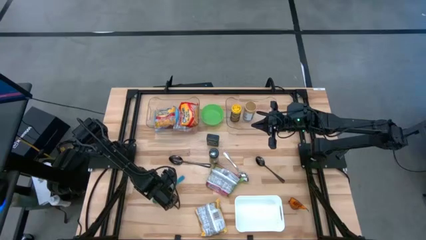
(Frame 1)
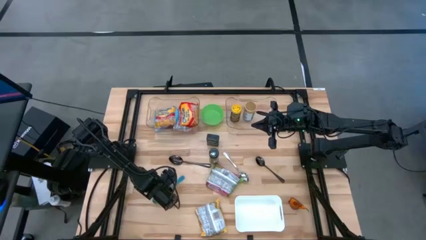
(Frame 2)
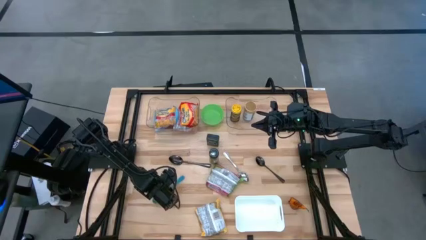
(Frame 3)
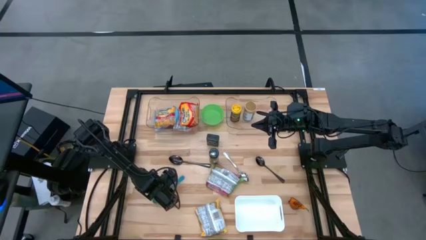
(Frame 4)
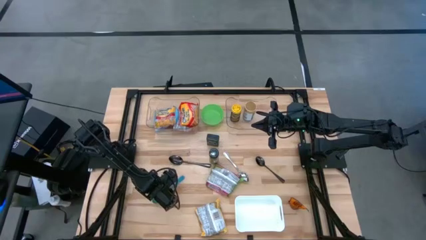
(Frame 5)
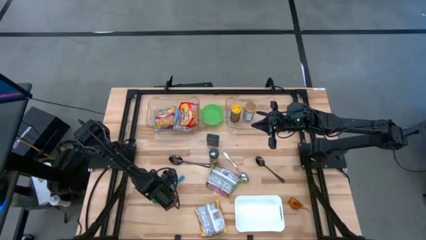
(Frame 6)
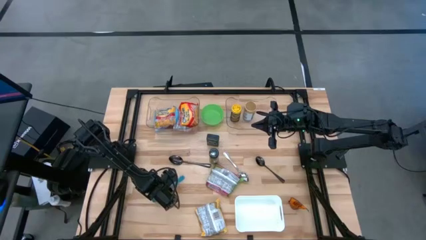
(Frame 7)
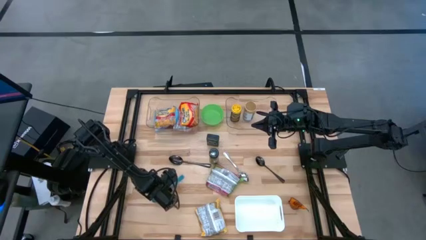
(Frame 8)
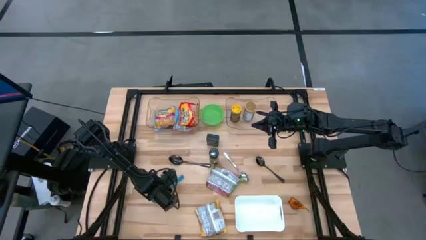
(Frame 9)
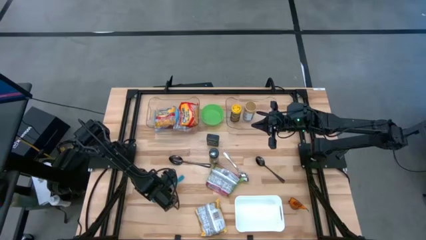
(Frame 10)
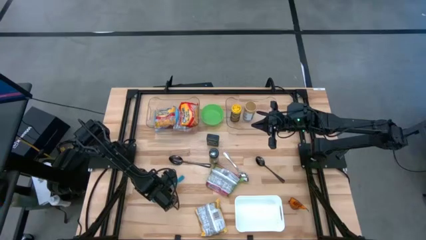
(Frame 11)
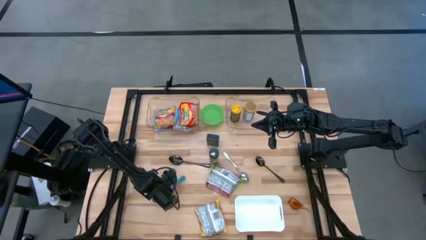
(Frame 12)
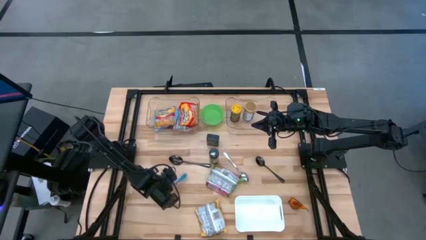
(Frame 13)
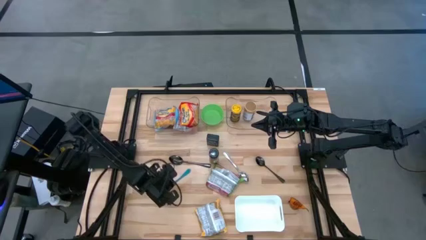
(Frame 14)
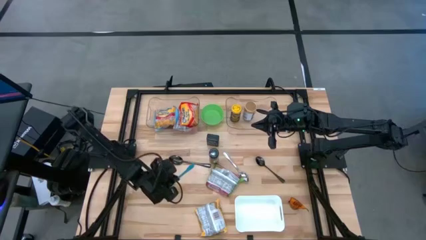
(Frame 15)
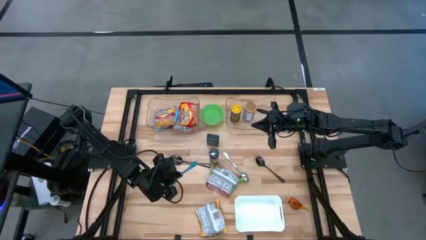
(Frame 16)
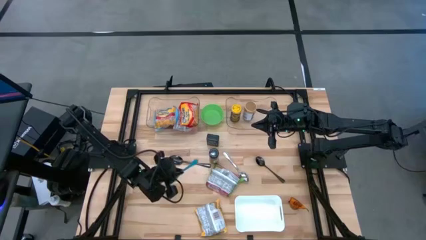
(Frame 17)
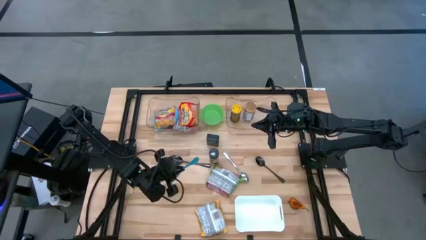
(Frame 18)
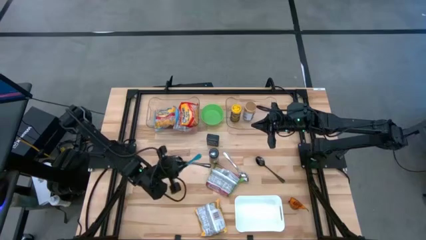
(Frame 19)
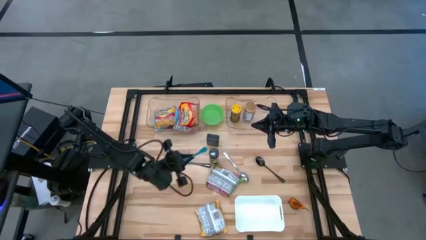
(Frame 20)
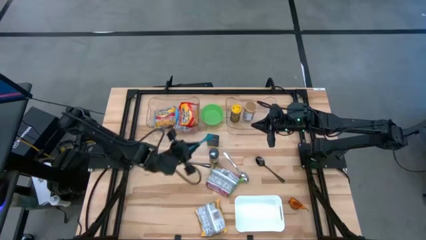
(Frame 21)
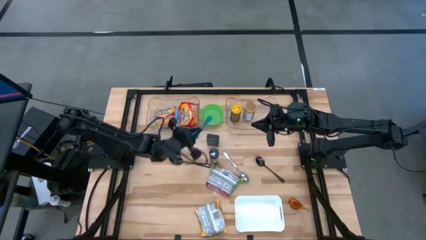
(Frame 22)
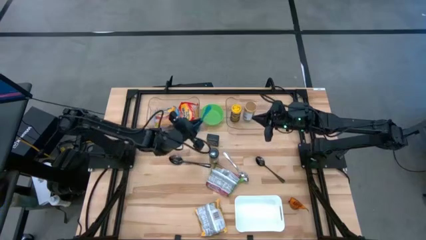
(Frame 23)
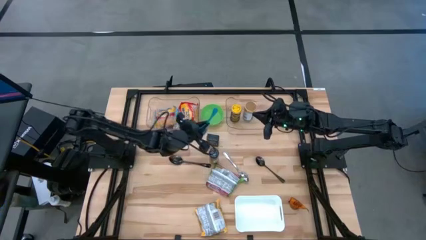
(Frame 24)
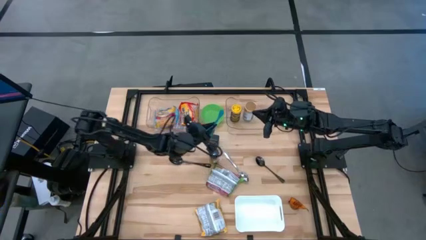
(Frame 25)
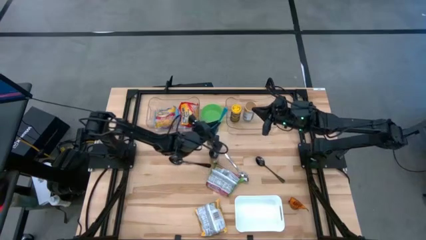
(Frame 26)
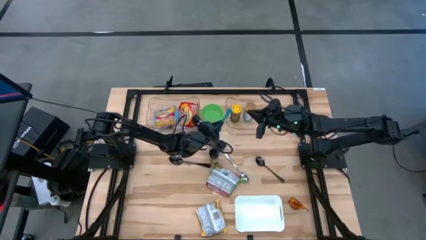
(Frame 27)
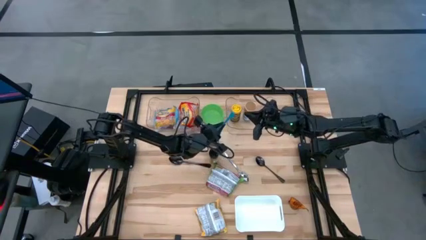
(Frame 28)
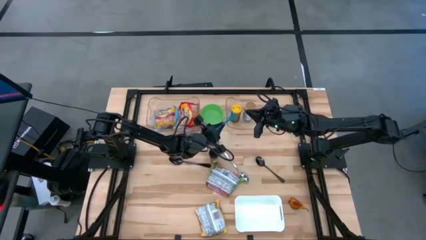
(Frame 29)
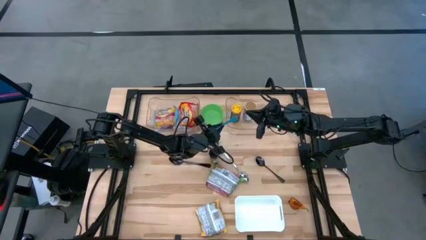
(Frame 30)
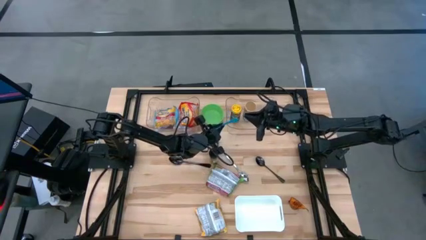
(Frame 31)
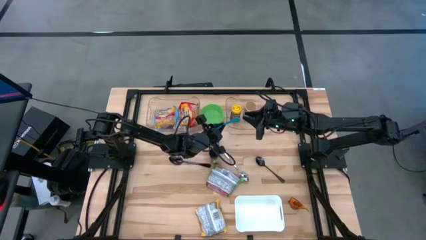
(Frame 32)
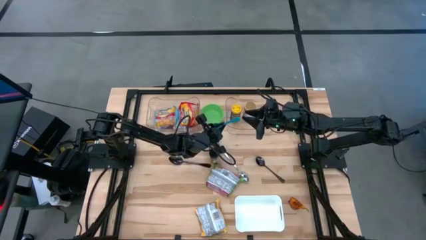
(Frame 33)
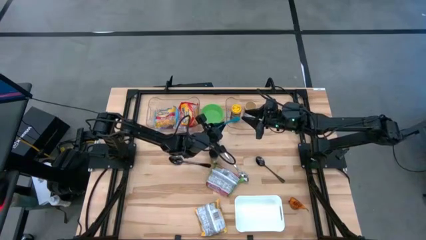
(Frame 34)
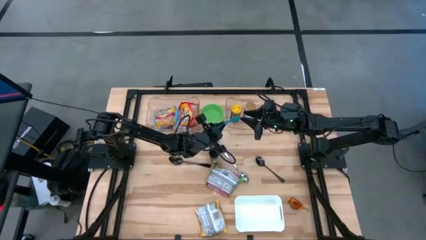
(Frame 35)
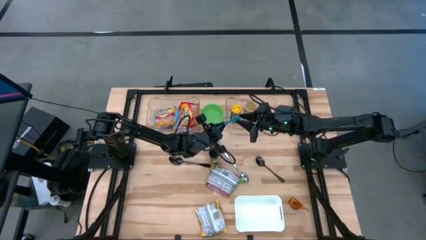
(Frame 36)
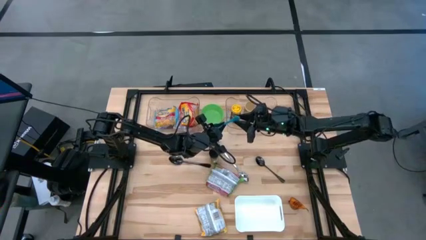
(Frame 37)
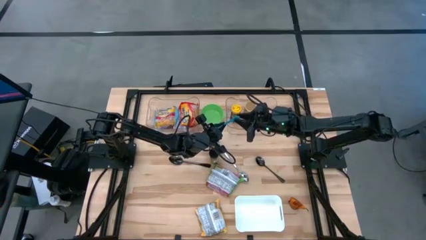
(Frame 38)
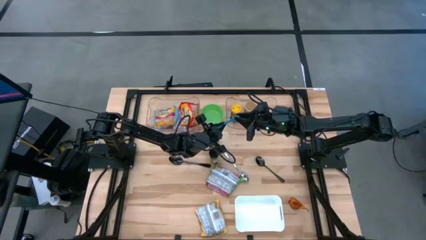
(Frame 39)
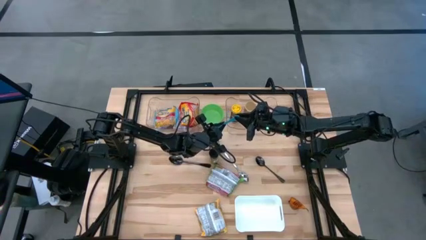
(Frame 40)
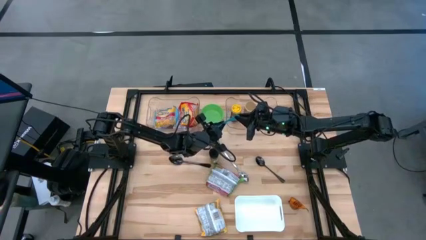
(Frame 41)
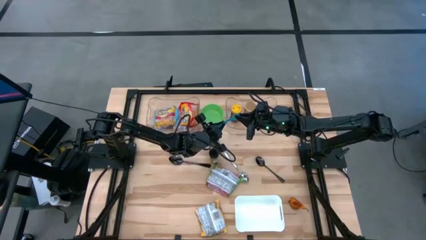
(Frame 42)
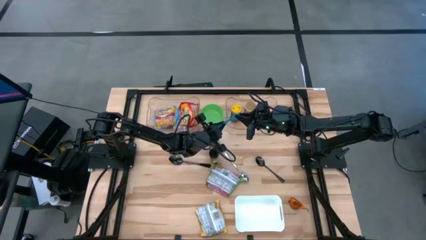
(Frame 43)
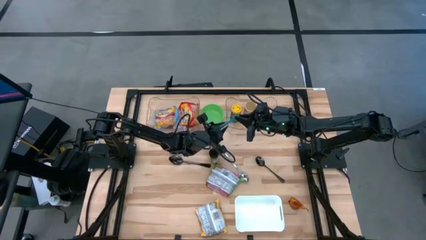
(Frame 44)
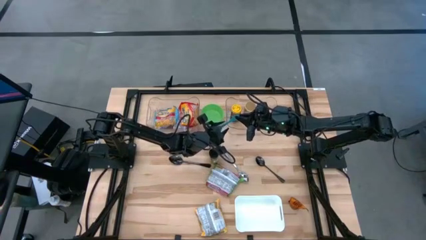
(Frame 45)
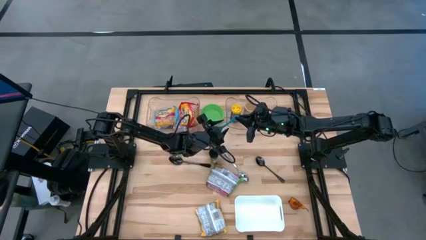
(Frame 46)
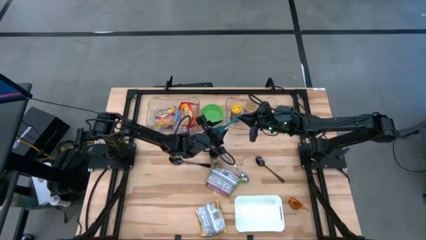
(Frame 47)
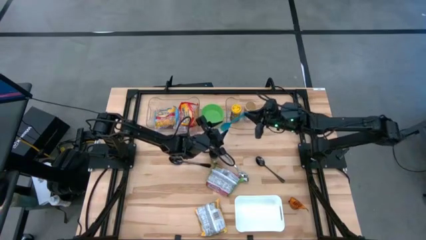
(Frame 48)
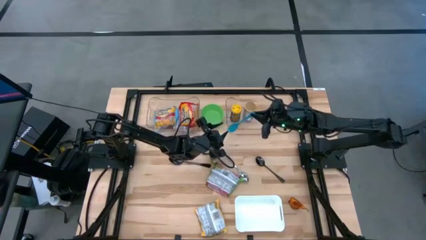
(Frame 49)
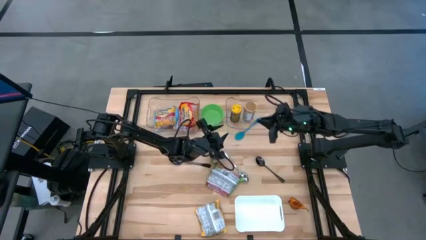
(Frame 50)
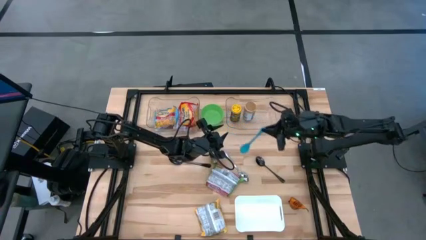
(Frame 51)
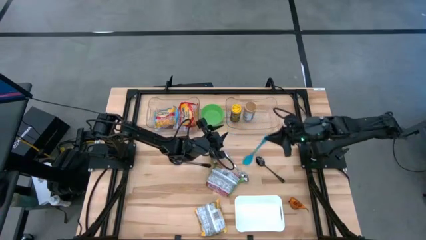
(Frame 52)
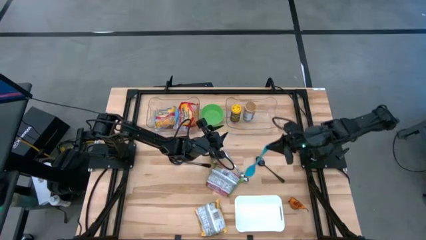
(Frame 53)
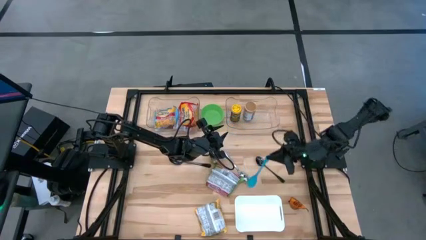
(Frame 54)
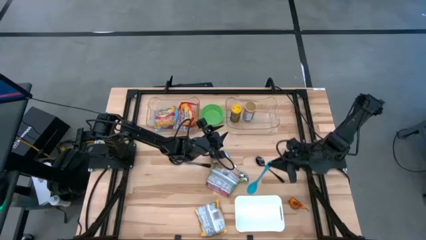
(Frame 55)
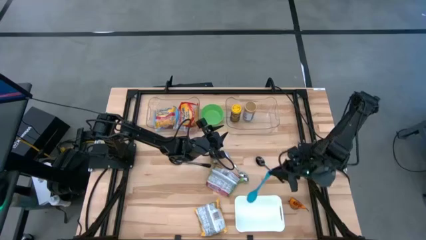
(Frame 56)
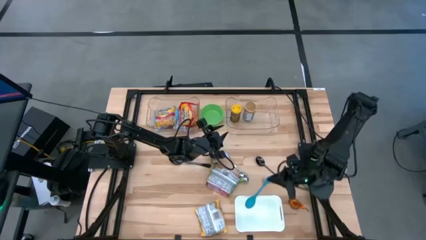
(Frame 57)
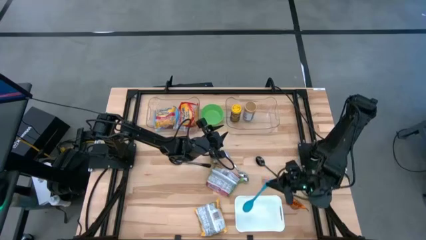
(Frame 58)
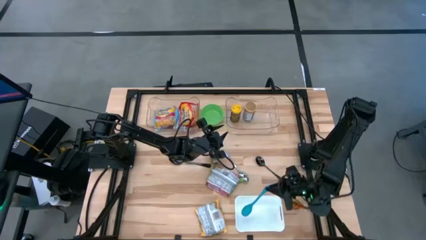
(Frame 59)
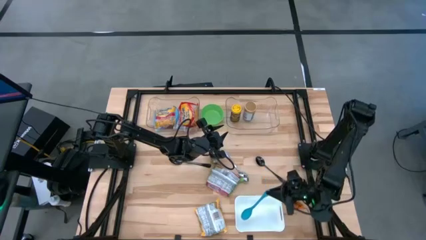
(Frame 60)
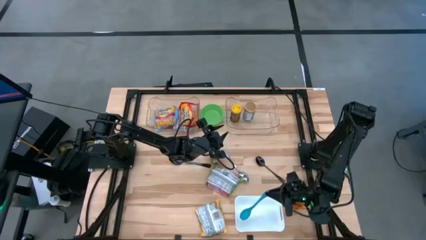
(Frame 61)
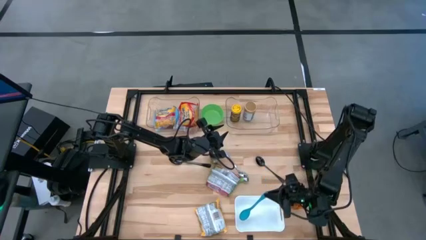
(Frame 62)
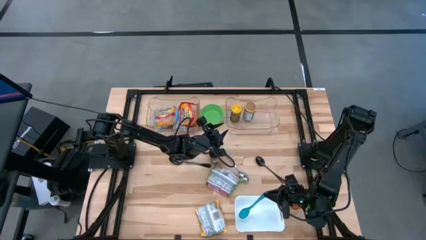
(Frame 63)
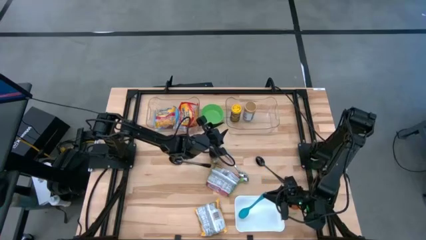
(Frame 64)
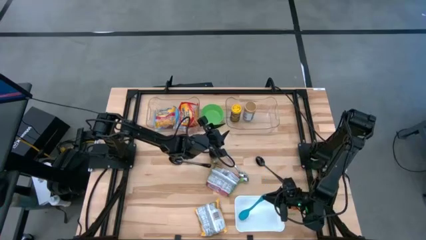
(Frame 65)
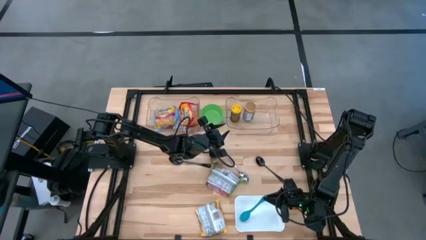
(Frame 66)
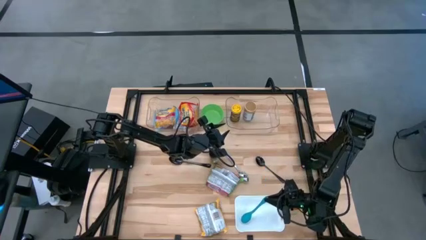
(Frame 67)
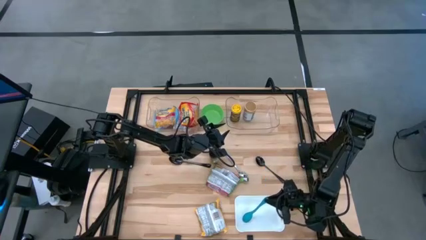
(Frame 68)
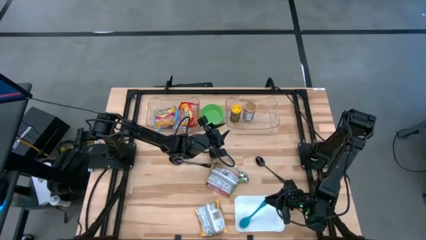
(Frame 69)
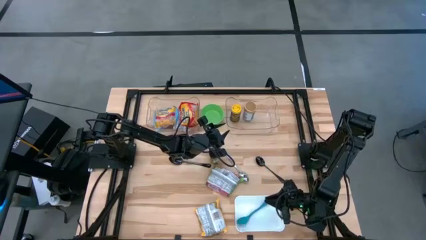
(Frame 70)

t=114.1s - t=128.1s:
Task: Pick & Place Food Item
Put the blue serving spoon in the white bin
